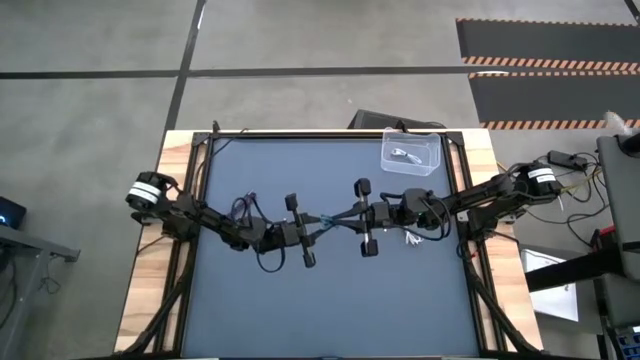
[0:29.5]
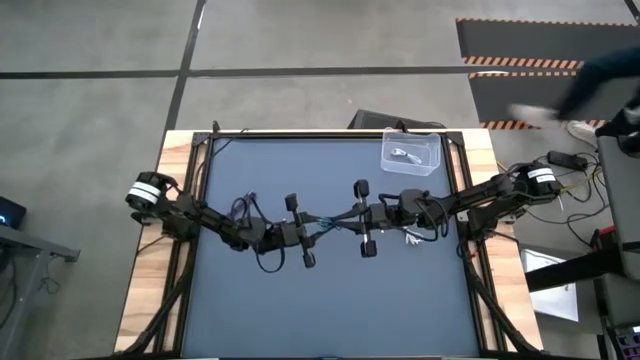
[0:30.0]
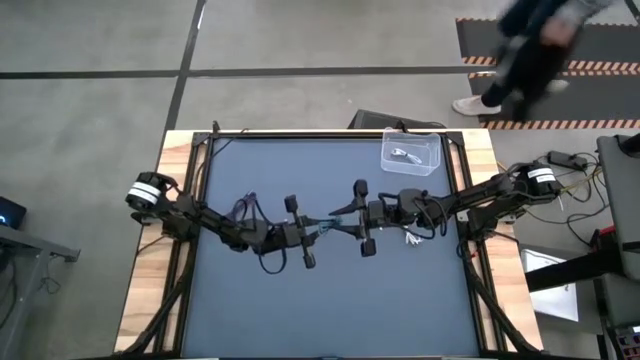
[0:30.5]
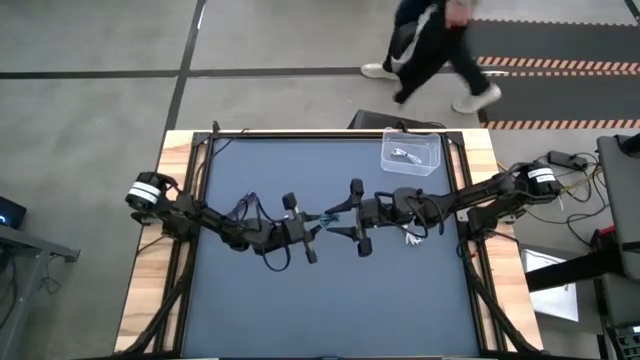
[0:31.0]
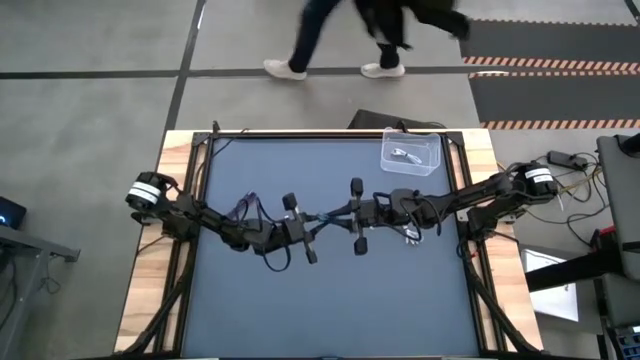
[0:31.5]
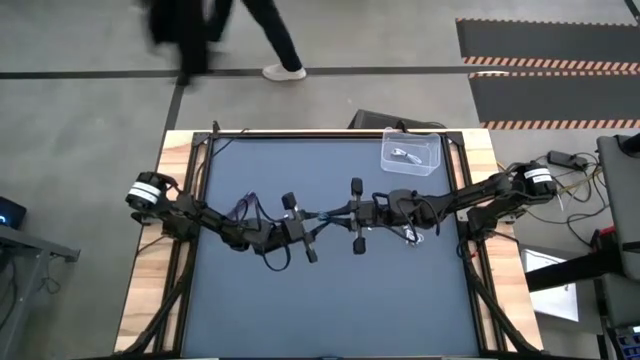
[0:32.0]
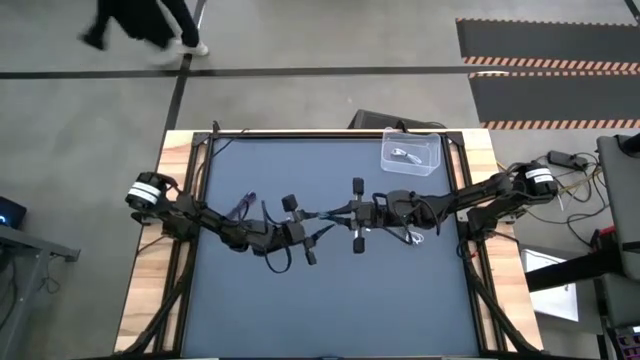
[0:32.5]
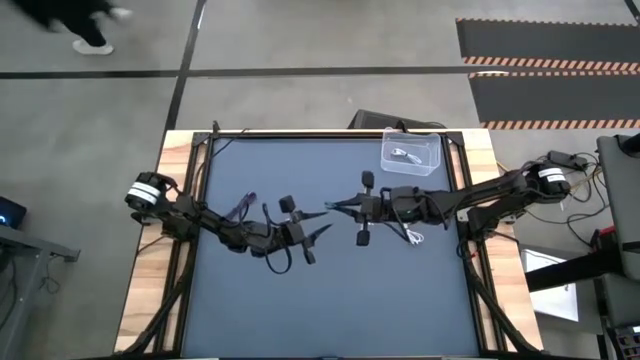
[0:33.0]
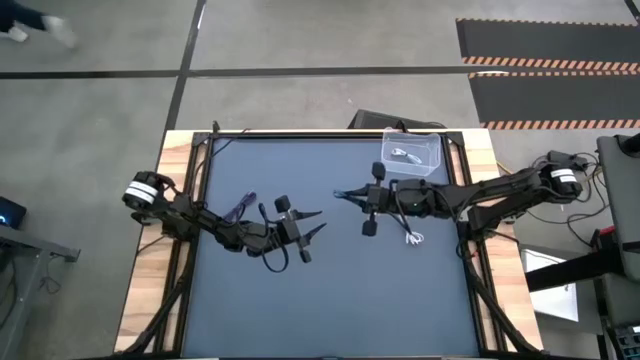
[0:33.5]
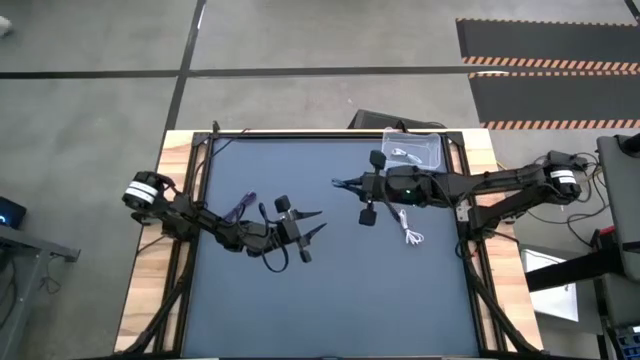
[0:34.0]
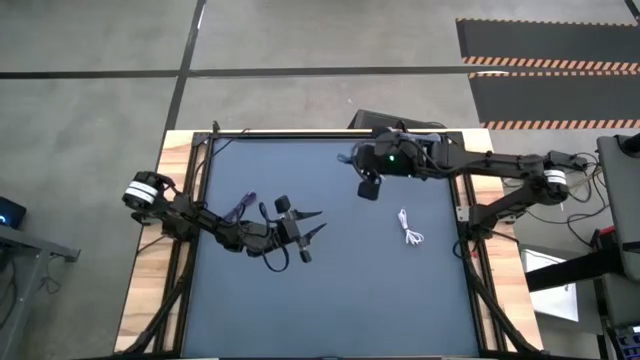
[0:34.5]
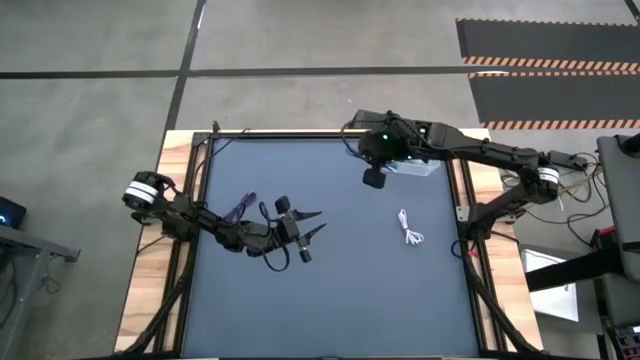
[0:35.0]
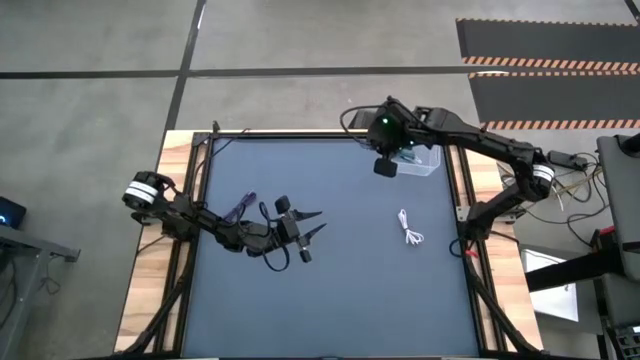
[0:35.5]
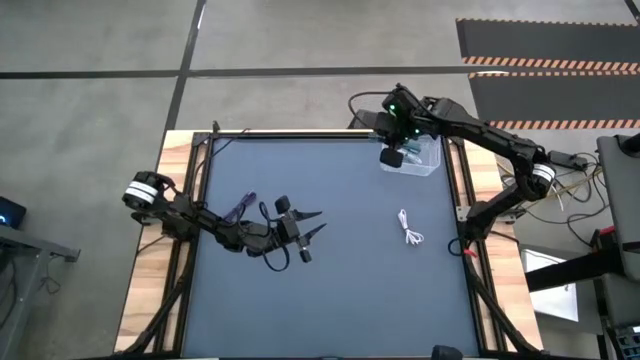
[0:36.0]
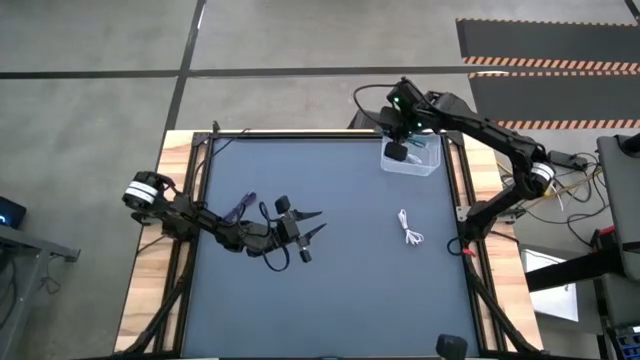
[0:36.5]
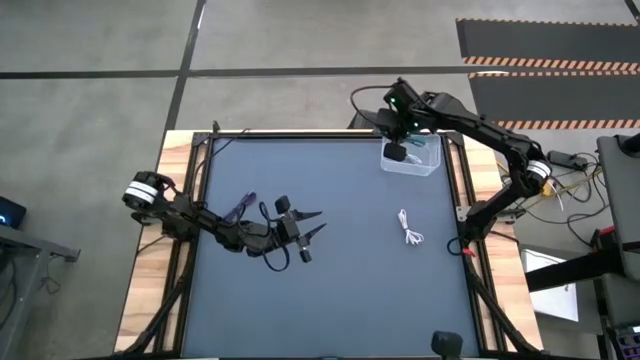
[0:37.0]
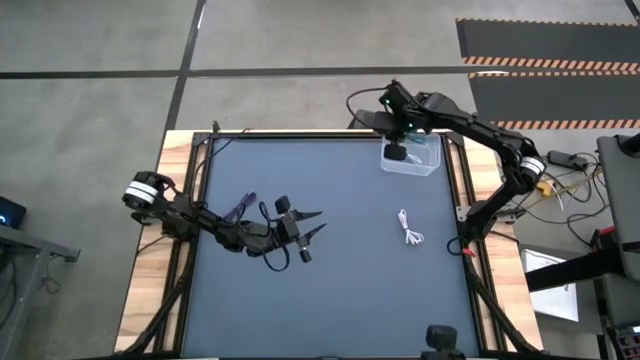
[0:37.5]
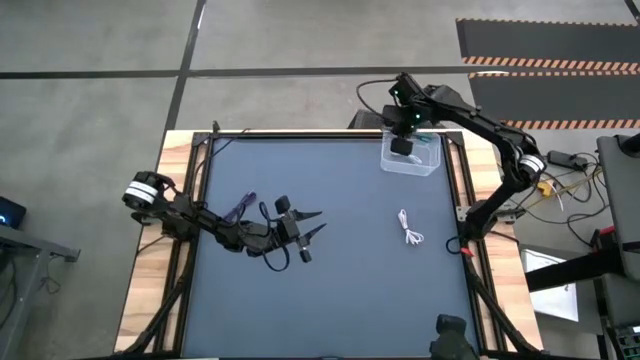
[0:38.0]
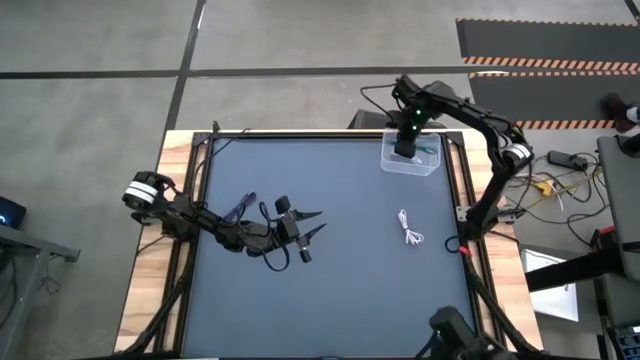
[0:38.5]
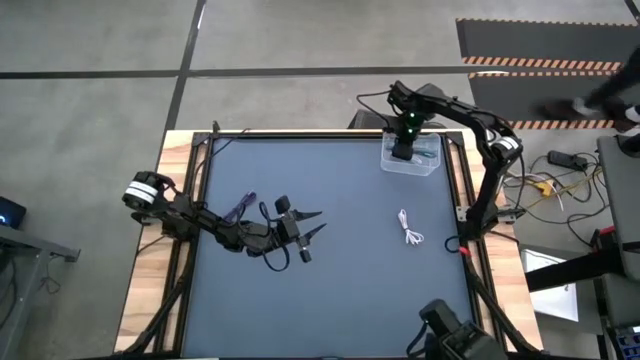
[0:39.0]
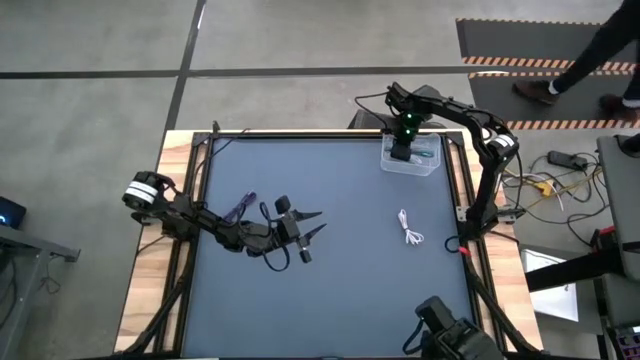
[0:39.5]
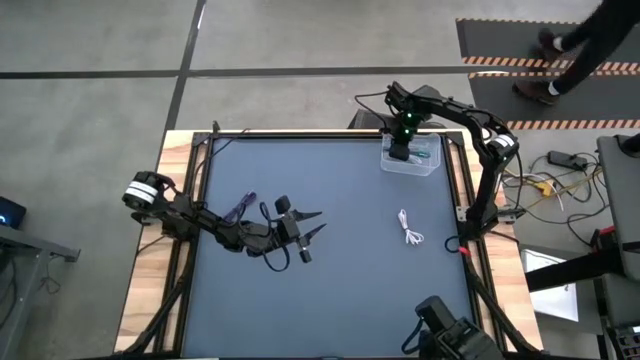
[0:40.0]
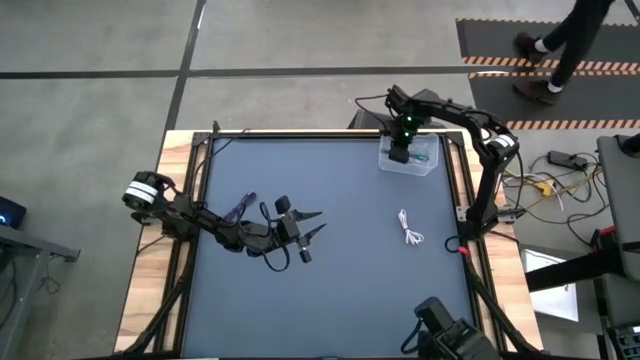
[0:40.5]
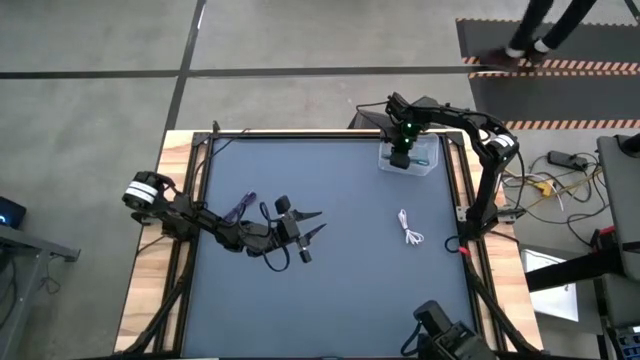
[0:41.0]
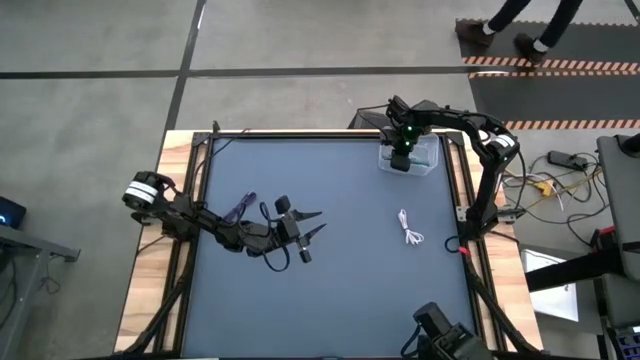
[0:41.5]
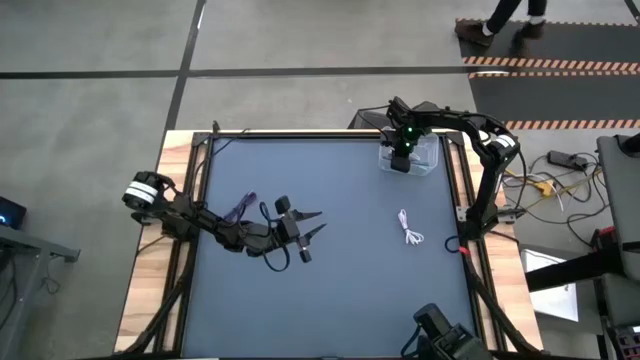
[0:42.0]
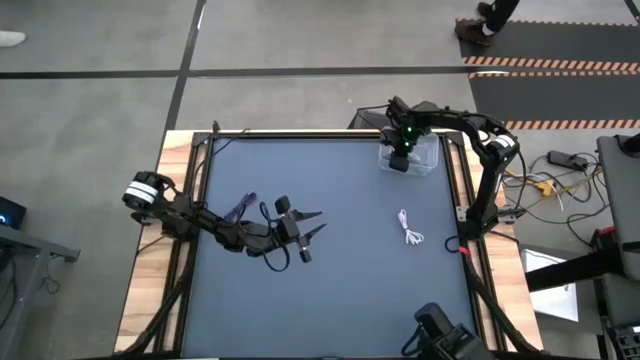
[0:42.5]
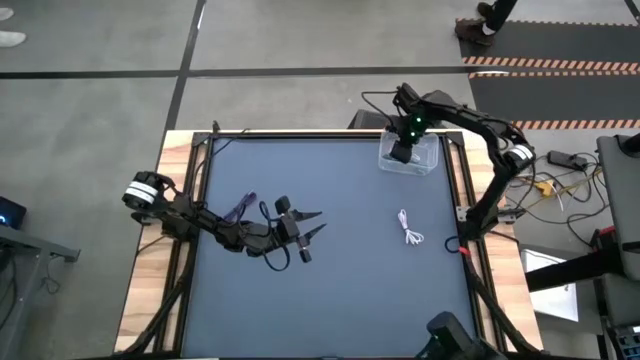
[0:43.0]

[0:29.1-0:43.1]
Task: Pick and place USB-C Cables
Put the blue charger cable into the bin

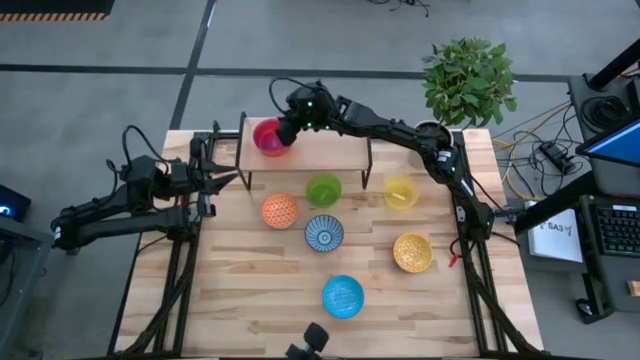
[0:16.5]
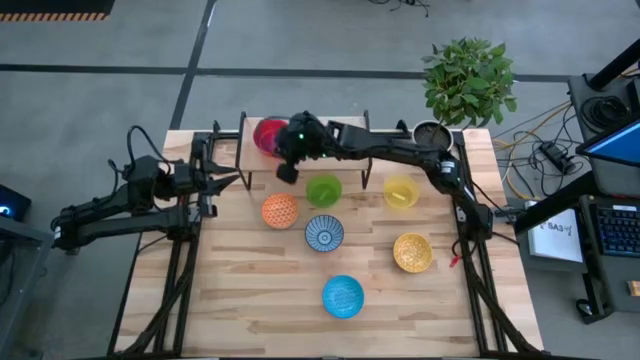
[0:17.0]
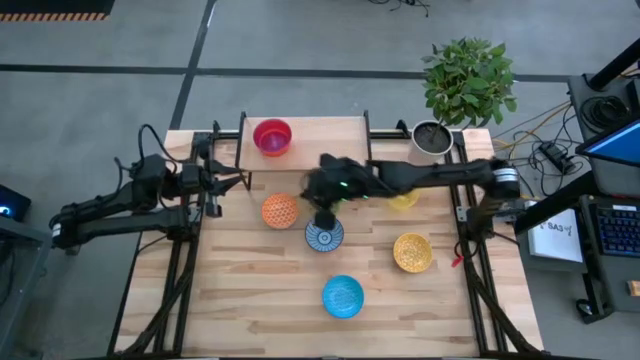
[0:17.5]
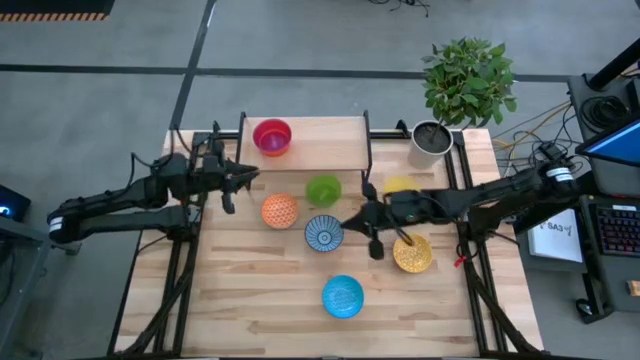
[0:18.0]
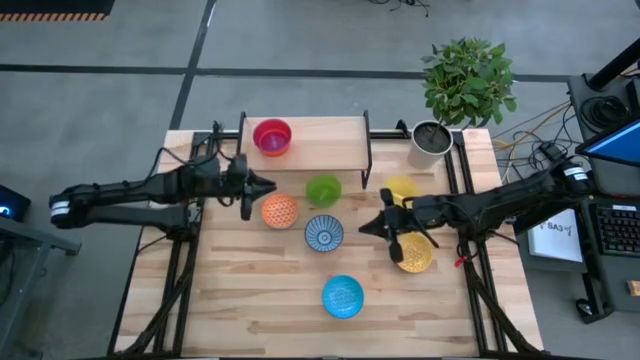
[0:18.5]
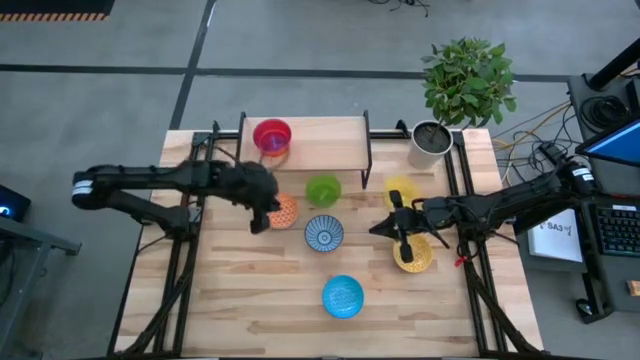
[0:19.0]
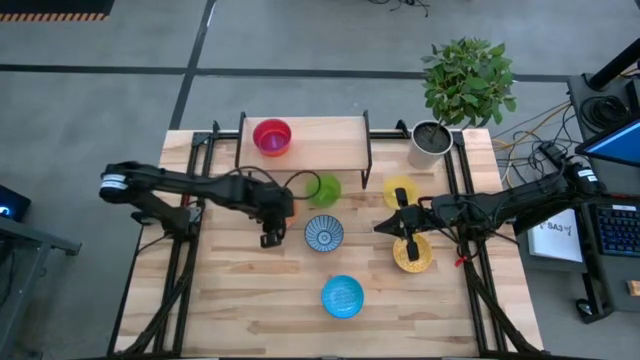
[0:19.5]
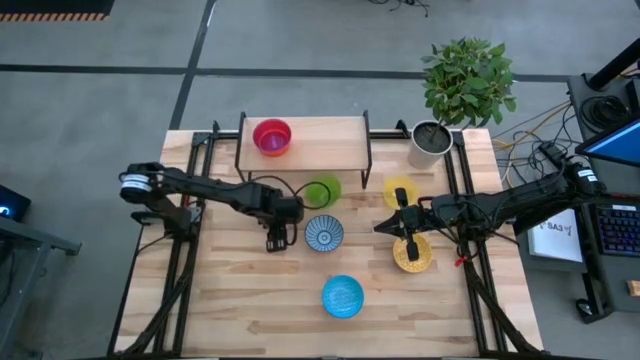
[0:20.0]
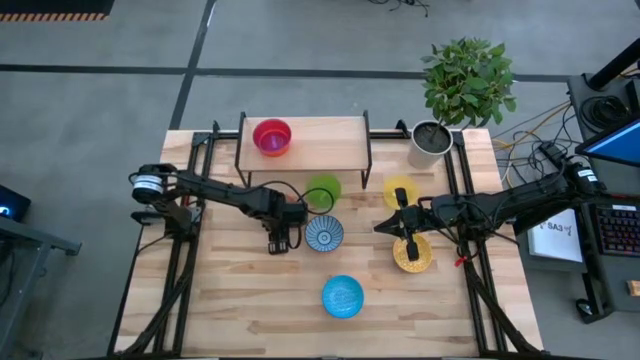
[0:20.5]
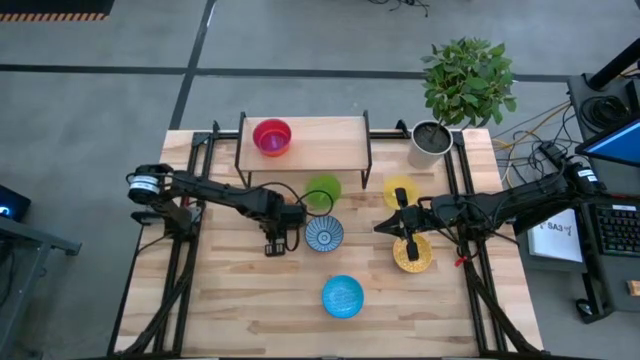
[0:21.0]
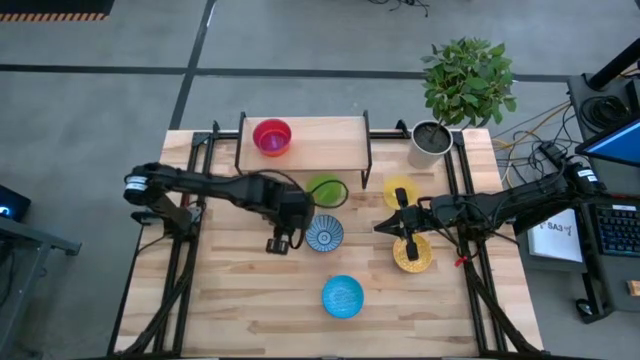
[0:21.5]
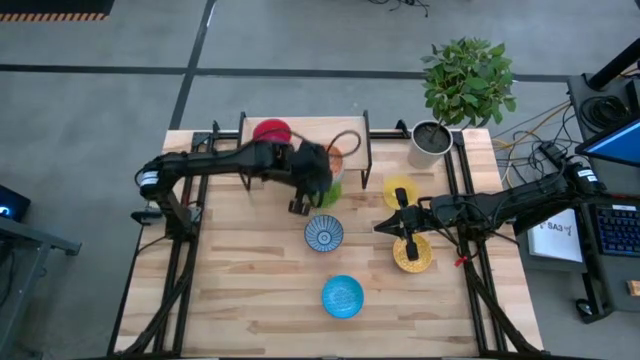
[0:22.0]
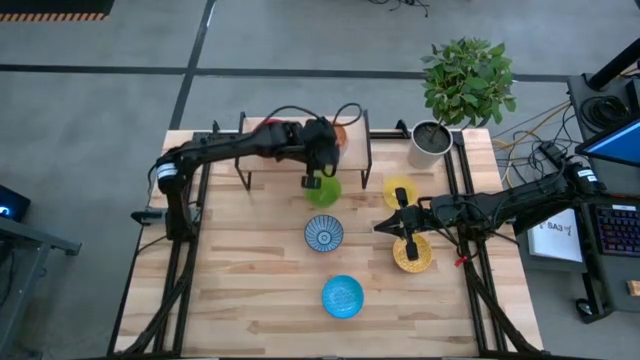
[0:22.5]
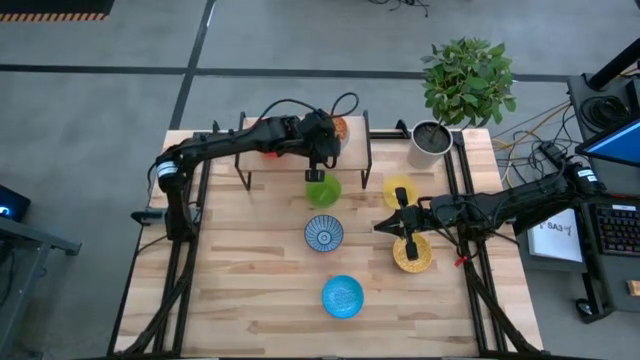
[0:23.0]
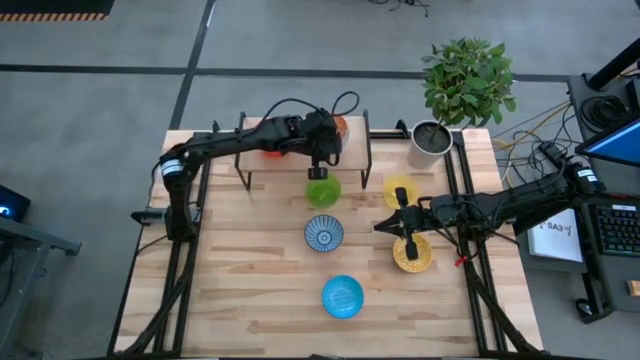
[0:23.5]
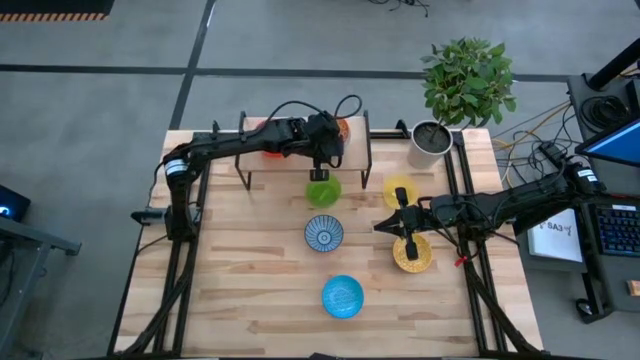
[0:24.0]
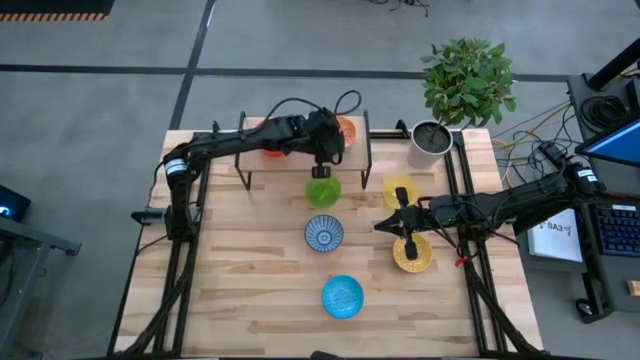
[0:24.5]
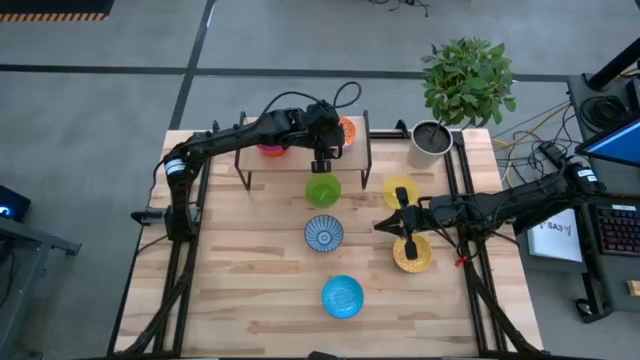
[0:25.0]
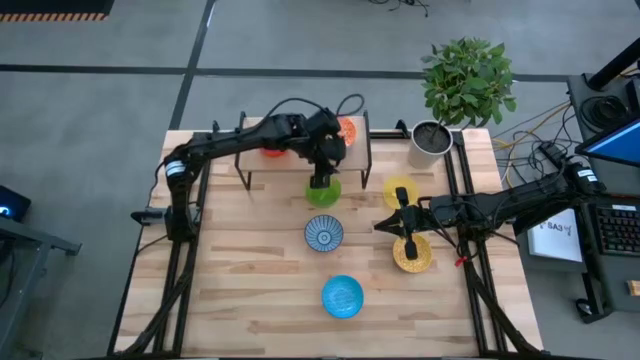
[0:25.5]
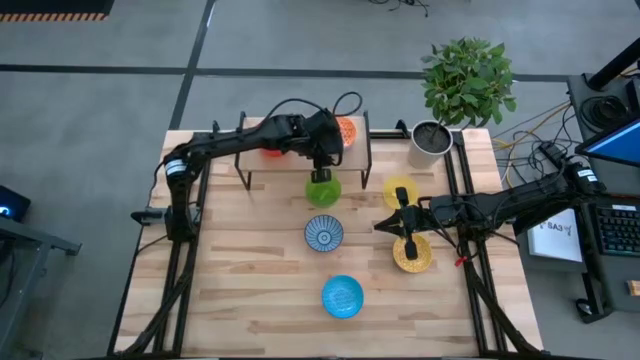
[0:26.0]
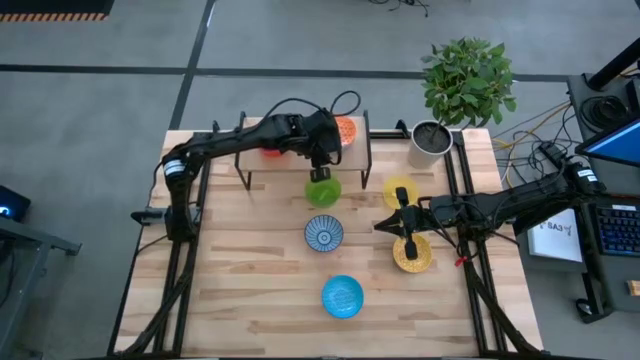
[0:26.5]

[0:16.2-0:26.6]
Task: Place and stack bowls onto a shelf
Put the orange patterned bowl on the shelf
